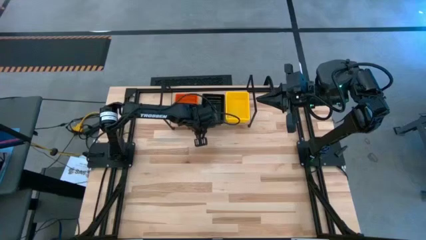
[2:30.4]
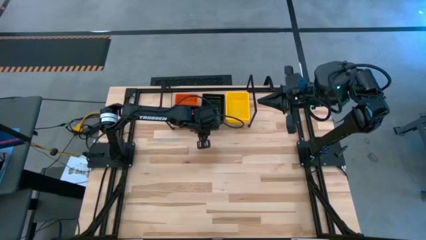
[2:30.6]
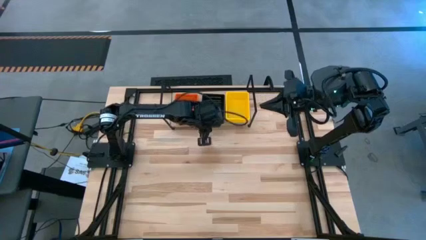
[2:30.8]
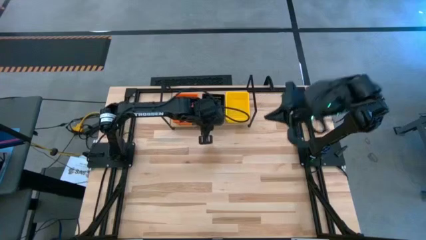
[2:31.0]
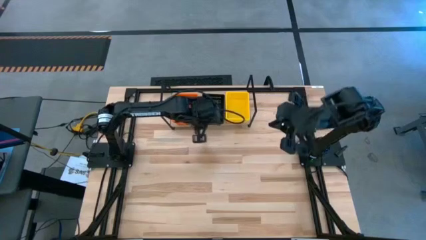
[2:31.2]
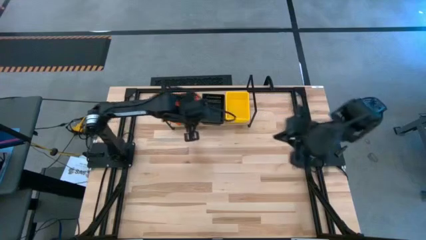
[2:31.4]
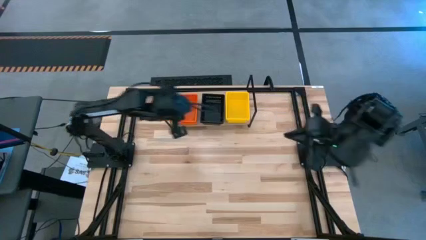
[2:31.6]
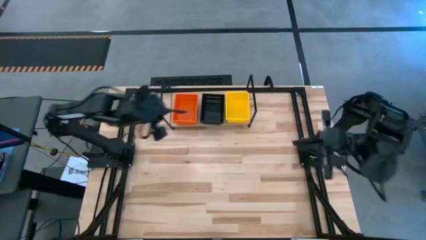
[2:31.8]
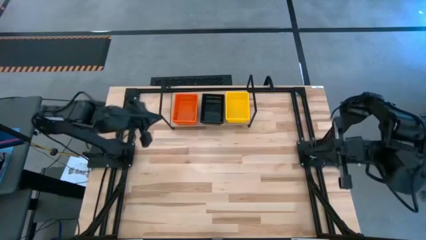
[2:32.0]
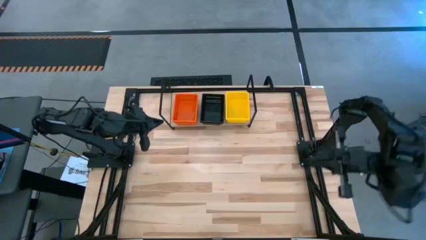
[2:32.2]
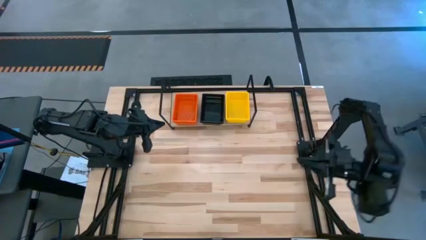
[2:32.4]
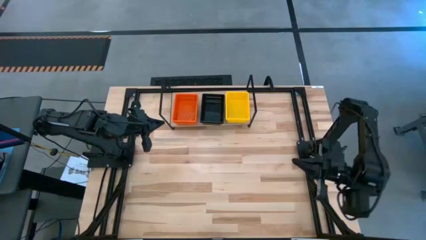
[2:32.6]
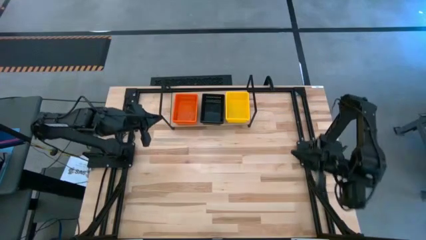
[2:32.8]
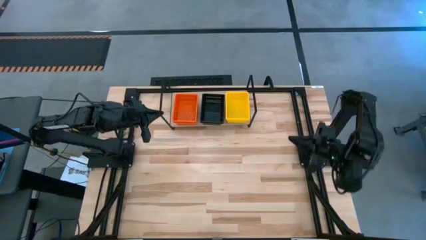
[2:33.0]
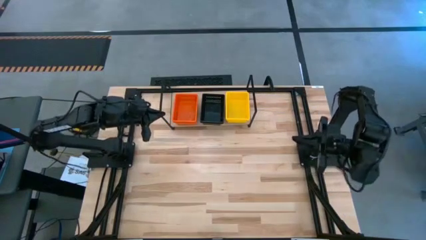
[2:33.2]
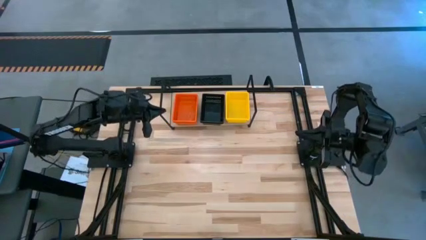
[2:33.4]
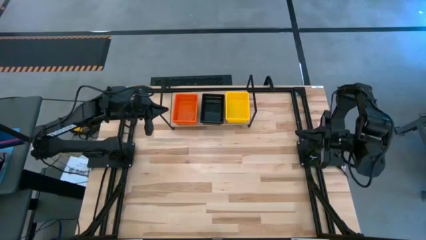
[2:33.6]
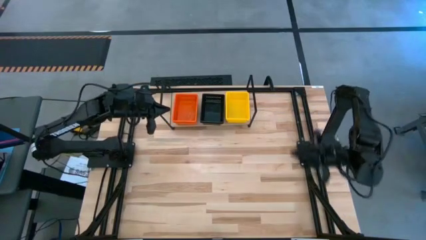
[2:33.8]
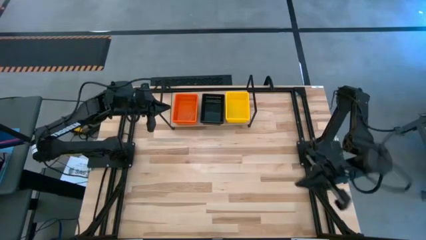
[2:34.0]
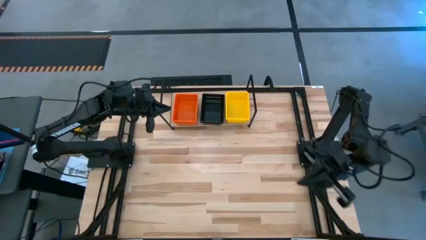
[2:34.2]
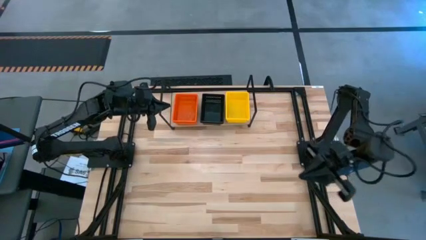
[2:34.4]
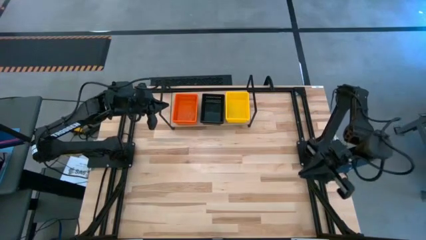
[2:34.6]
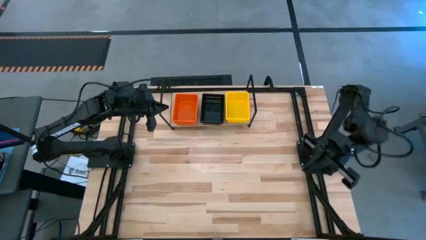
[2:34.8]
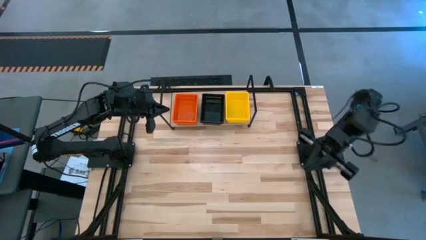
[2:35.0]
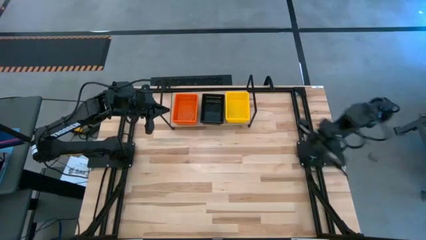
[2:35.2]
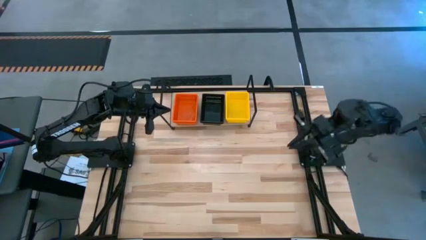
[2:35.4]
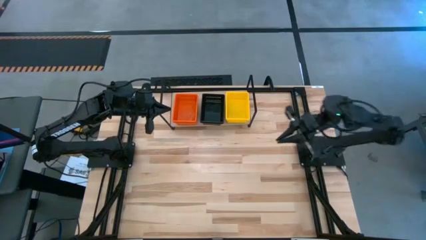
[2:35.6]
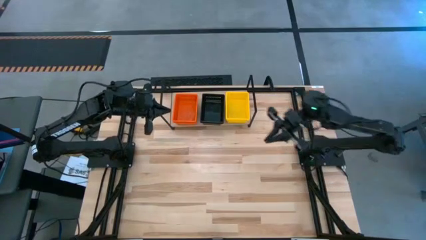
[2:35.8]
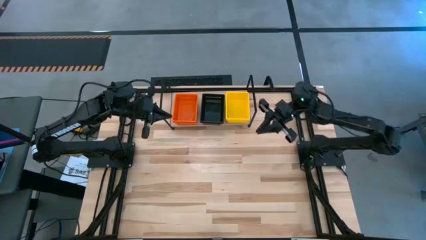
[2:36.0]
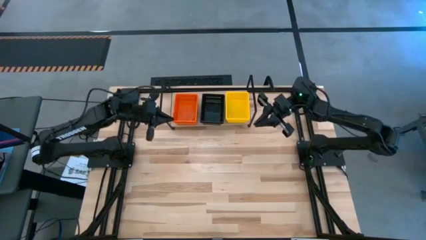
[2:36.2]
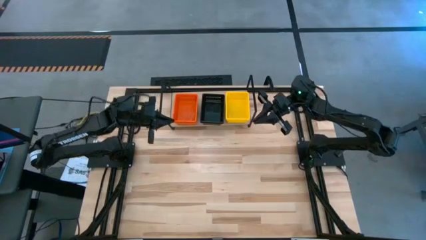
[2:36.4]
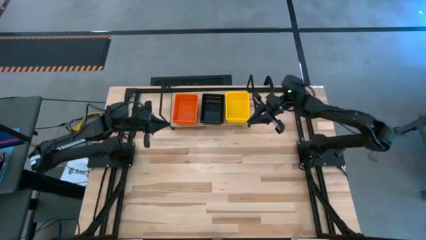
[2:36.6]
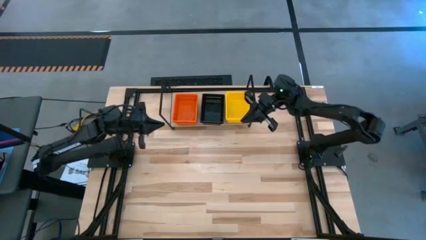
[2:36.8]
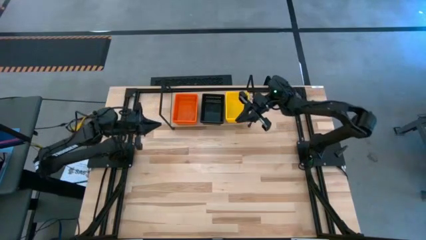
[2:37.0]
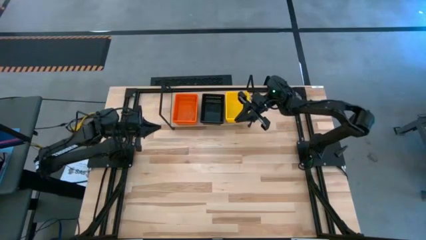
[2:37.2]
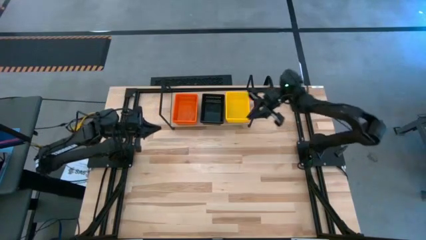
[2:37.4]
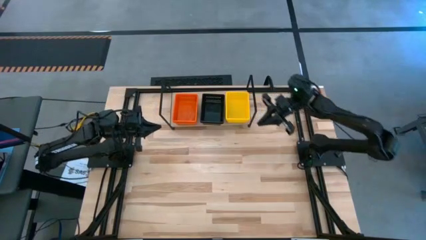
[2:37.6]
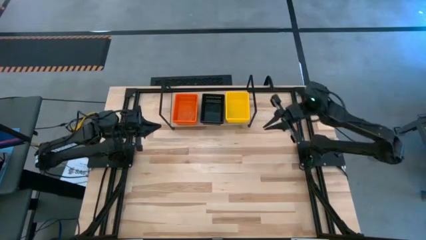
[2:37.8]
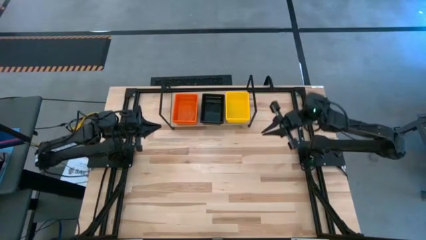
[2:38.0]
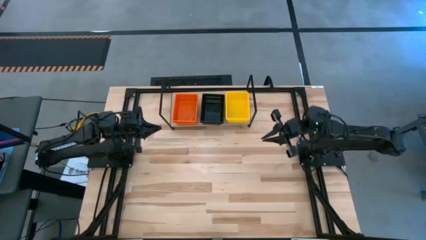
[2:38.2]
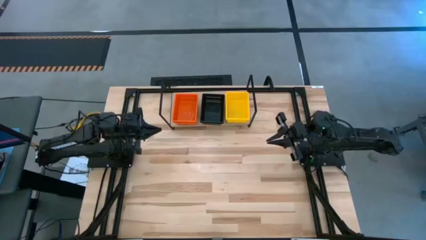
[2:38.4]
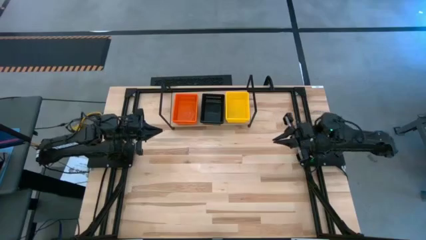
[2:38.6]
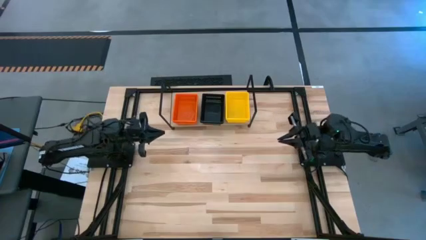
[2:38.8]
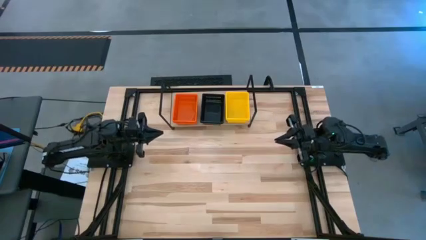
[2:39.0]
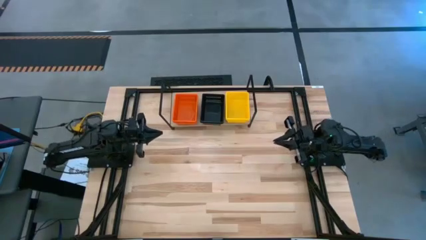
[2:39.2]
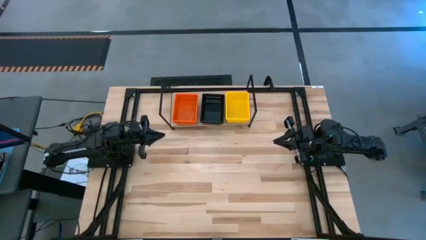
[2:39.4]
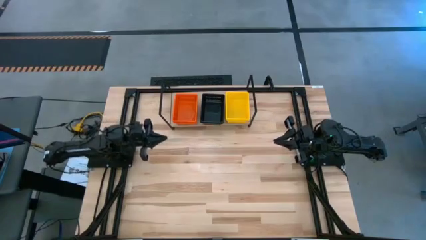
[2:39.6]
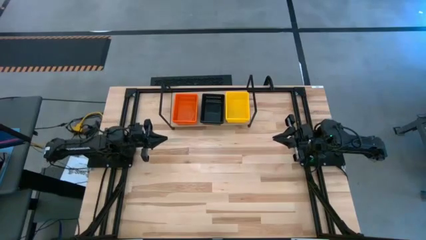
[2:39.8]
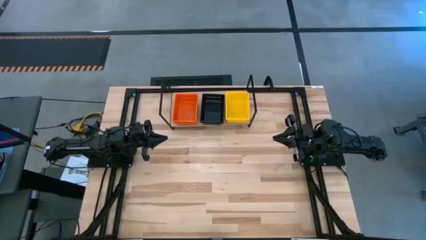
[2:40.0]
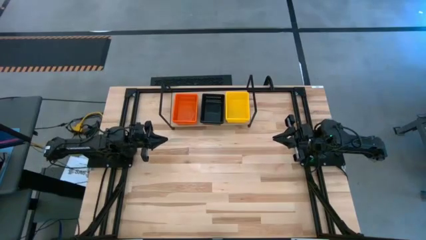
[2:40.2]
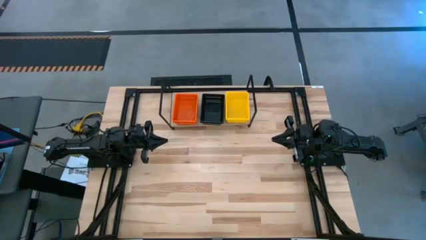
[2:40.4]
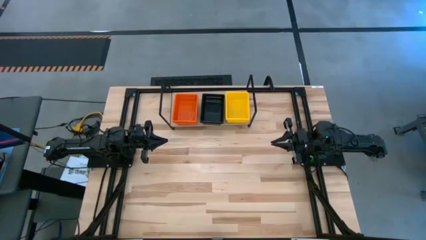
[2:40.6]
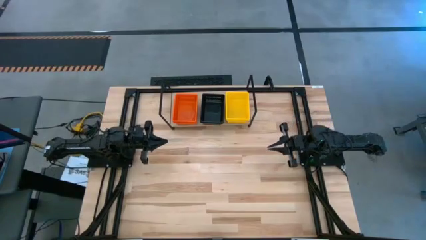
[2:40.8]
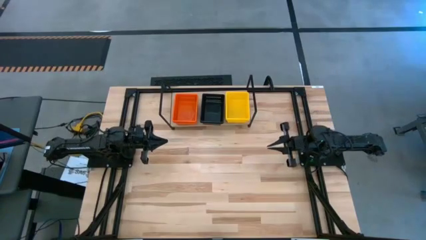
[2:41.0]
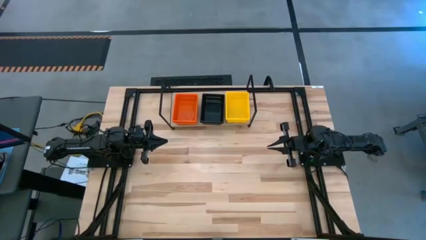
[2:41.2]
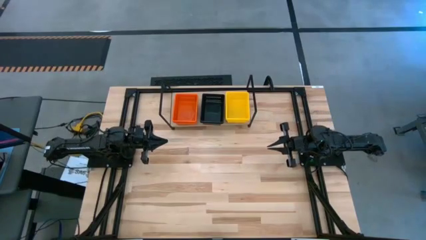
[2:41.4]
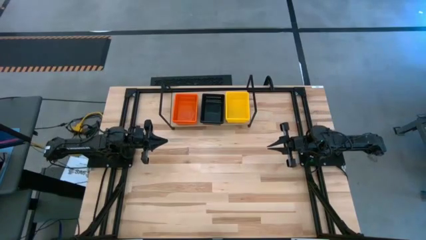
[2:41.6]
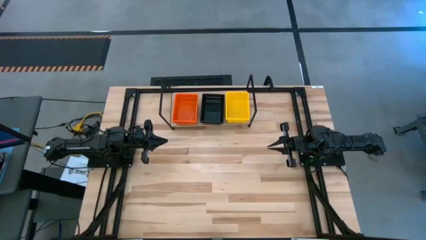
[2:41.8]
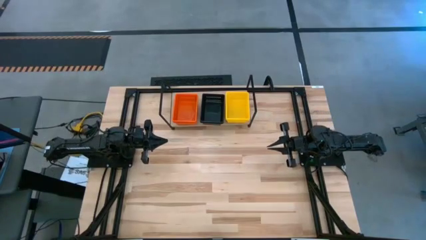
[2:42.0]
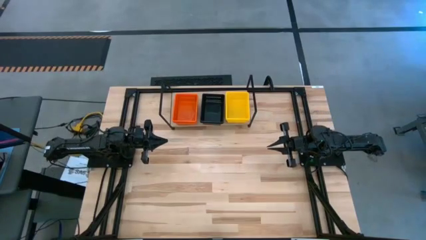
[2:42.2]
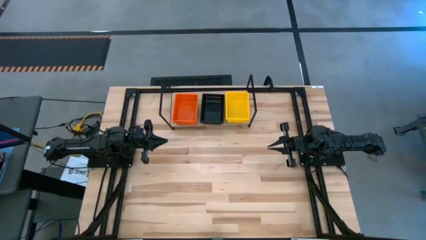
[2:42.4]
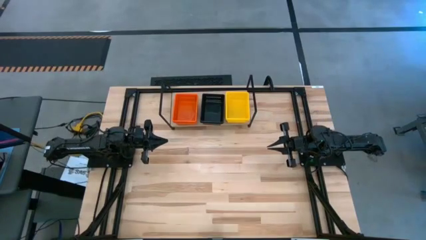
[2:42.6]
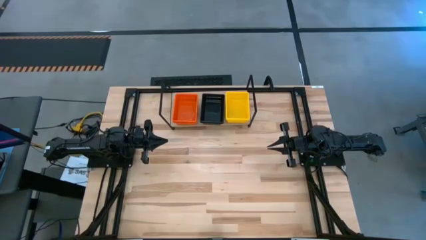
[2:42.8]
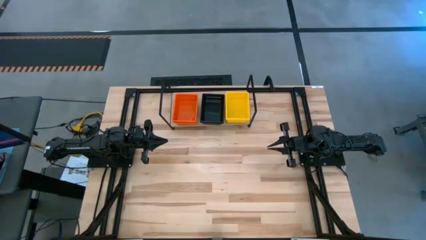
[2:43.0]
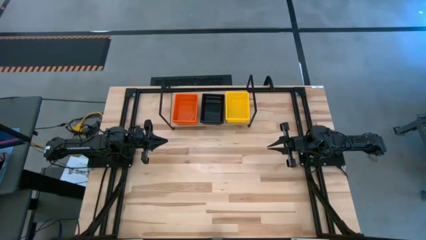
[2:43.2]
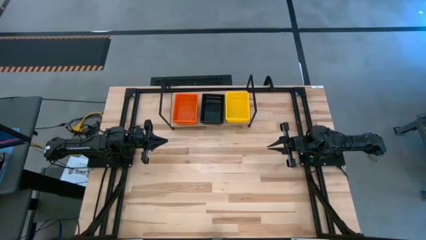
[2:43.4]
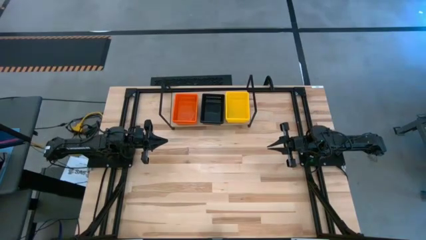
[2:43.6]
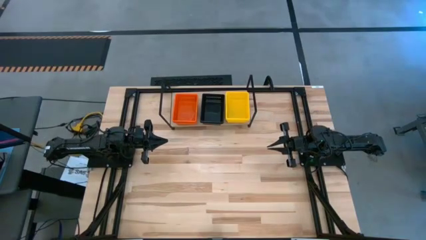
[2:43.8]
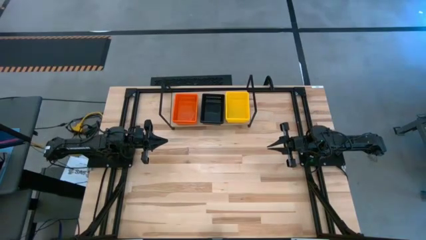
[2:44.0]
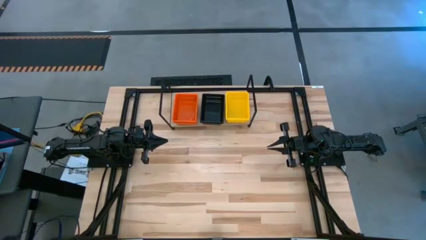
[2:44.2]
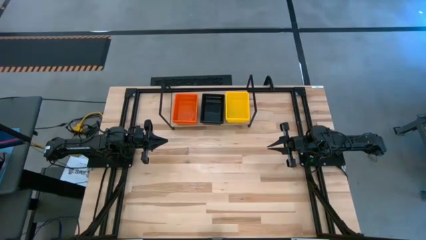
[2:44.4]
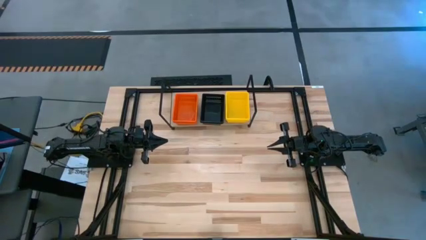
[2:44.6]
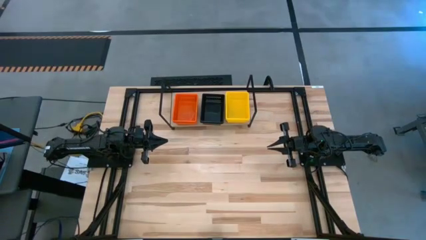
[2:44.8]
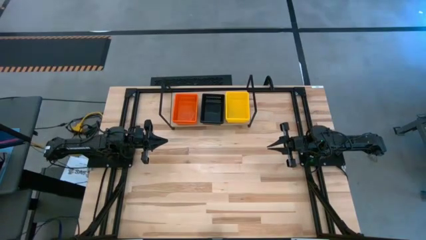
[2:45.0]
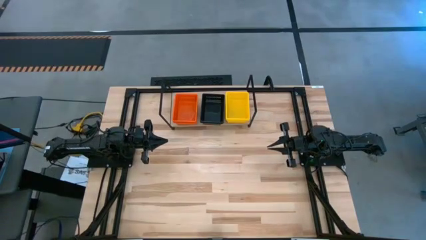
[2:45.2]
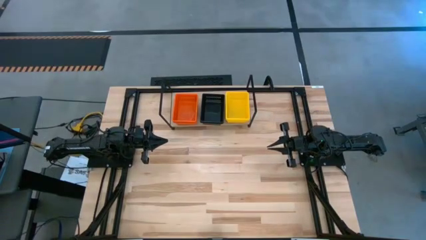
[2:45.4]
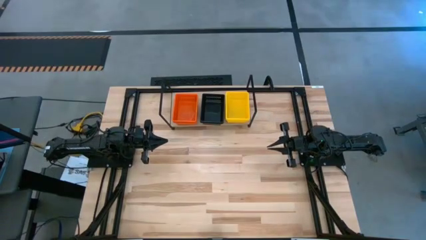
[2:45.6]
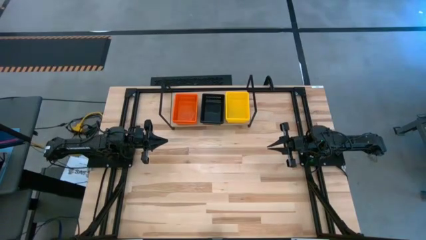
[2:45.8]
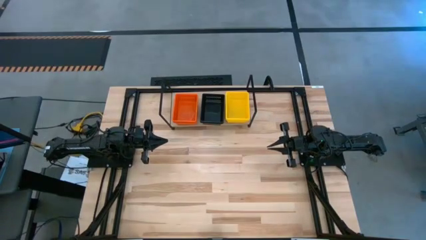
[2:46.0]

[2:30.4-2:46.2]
Task: Stack baskets on shelf by color
Return to Home Position
